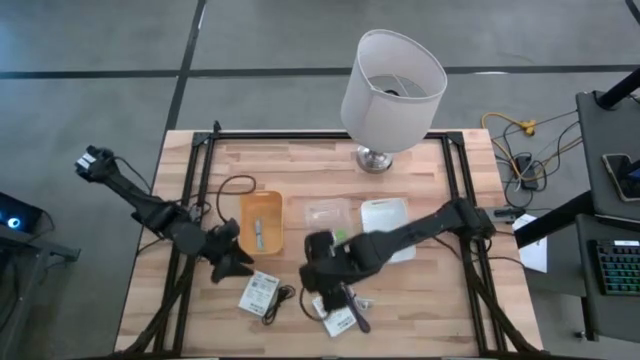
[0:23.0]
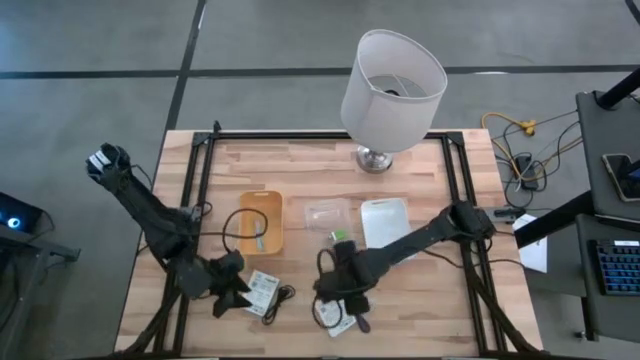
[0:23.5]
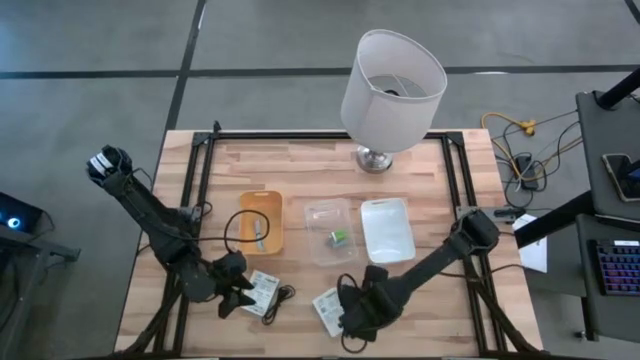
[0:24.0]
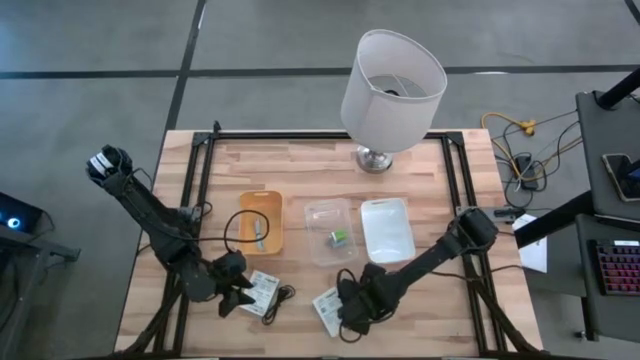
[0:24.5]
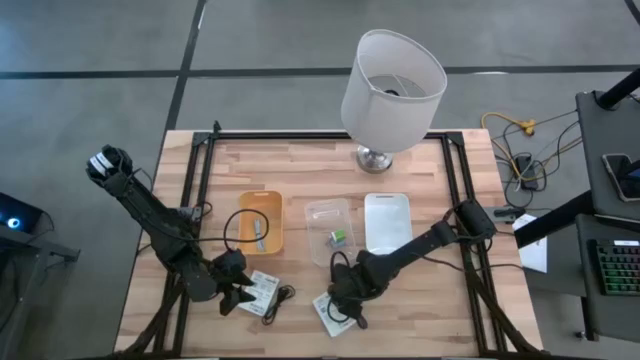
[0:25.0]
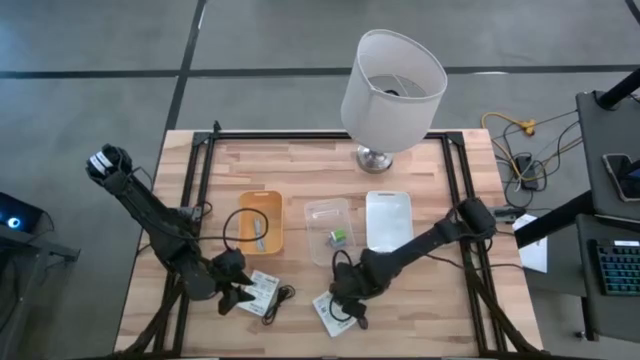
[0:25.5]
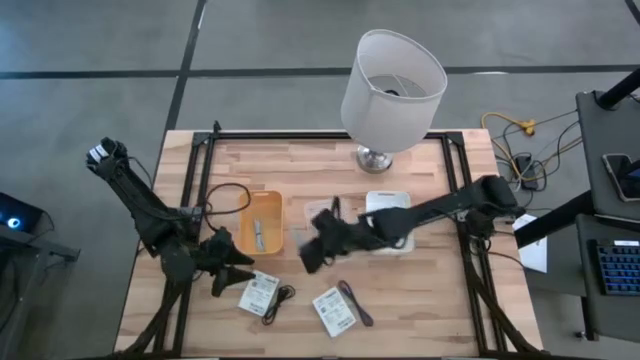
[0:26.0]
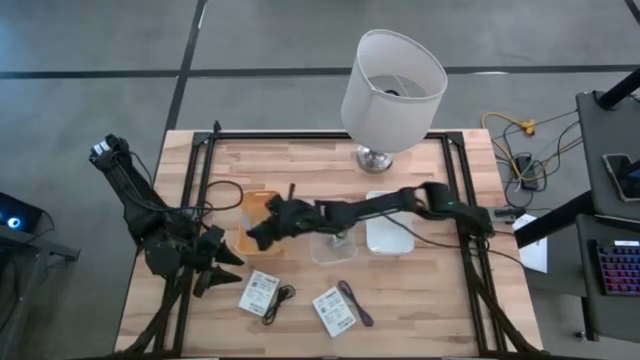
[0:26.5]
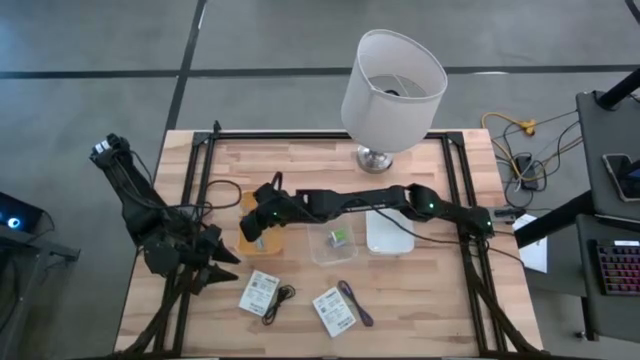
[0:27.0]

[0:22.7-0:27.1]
Task: Pick and place items into bin
Put the white charger cable into the orange bin

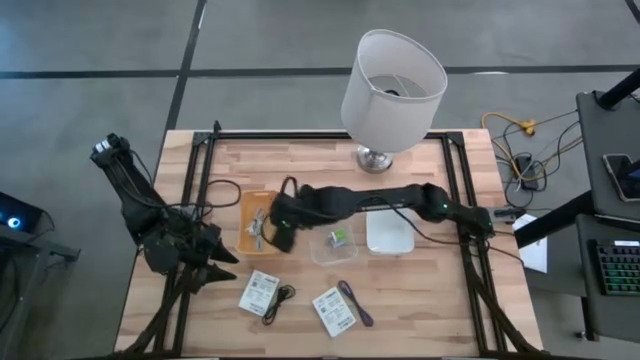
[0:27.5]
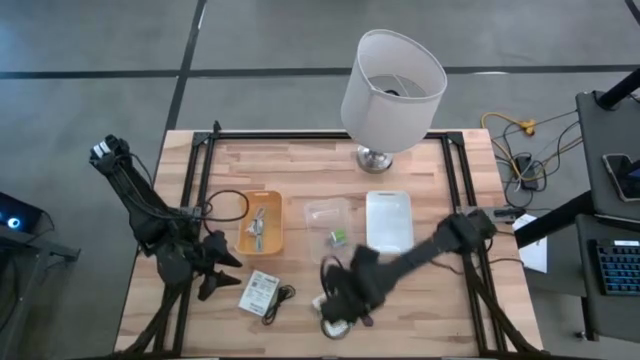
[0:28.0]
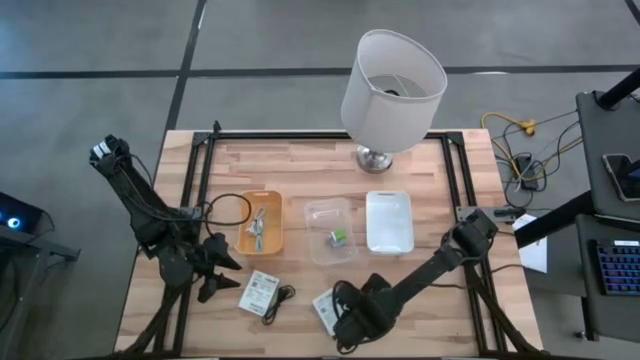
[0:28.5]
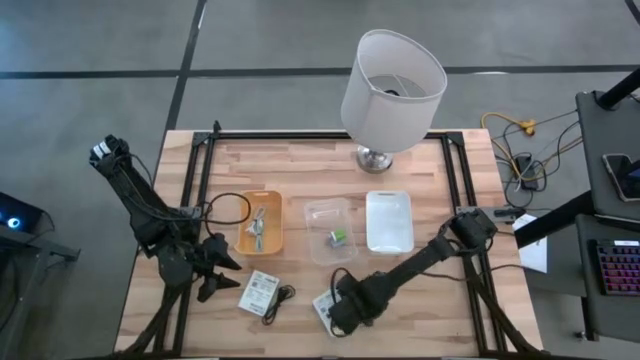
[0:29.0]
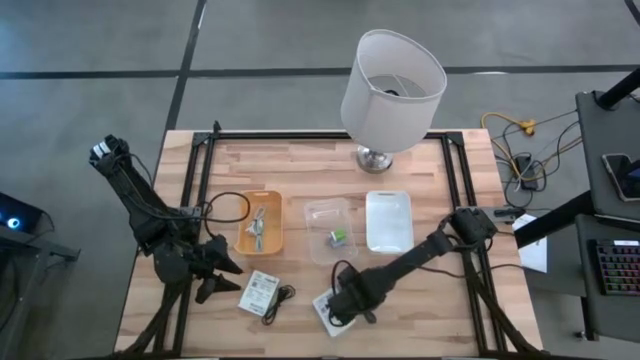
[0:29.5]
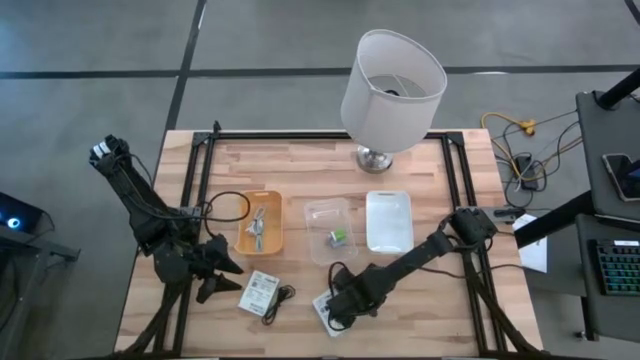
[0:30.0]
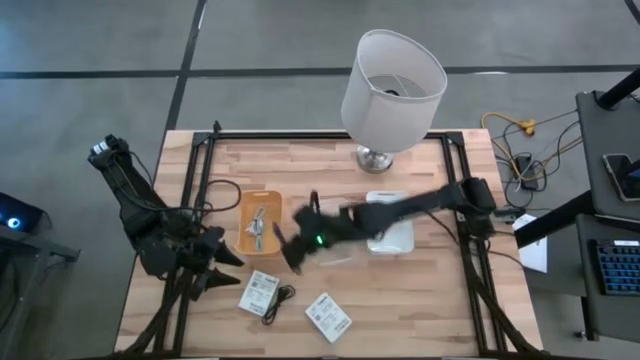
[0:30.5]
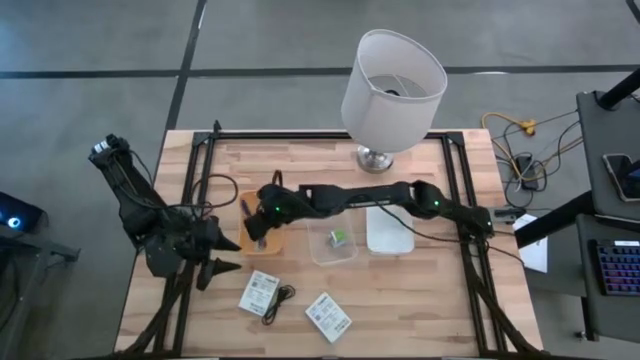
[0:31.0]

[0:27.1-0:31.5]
Put the black violet charger cable into the orange bin

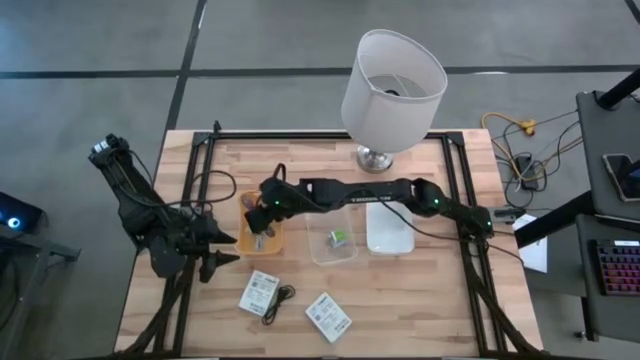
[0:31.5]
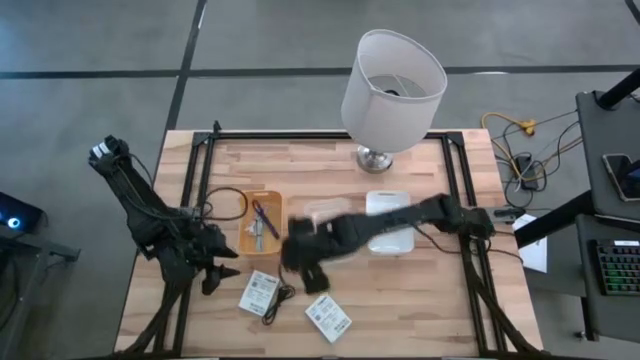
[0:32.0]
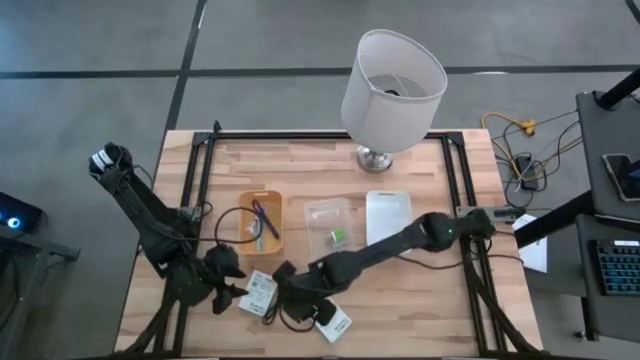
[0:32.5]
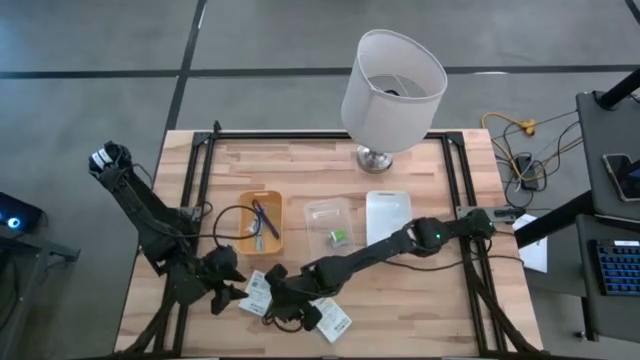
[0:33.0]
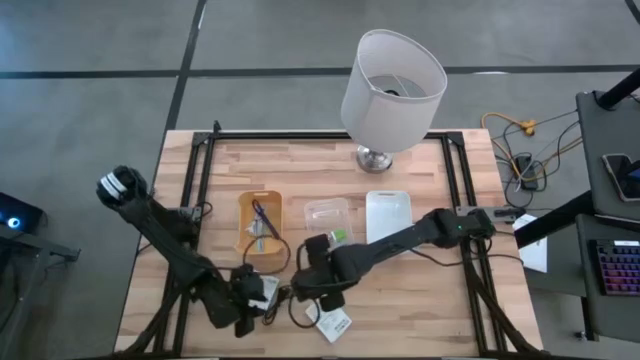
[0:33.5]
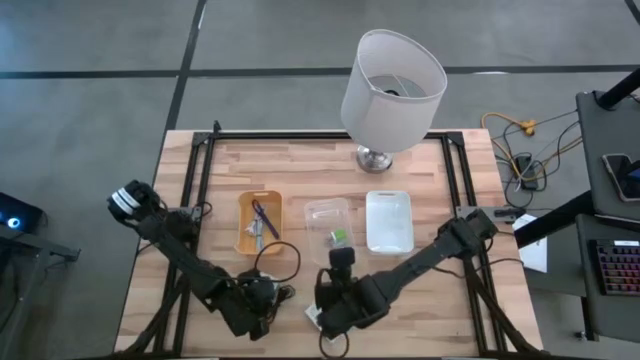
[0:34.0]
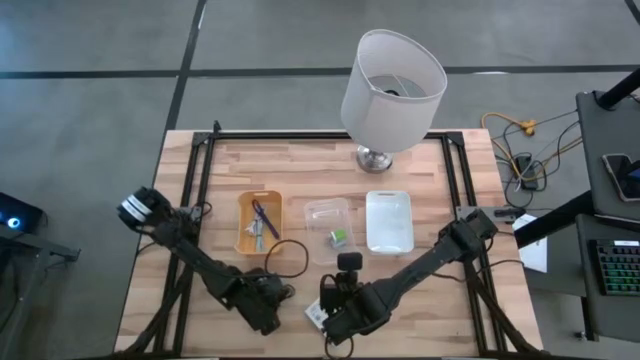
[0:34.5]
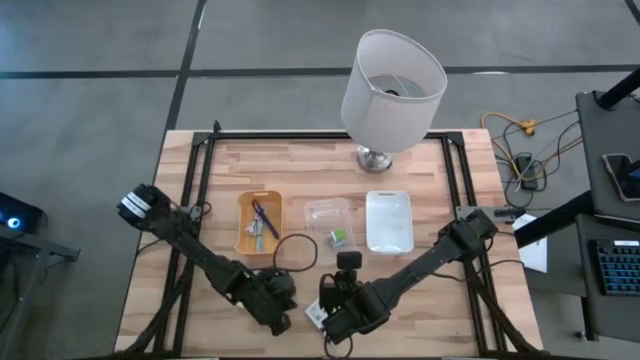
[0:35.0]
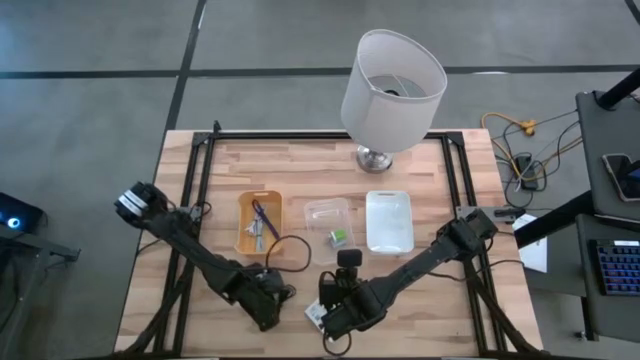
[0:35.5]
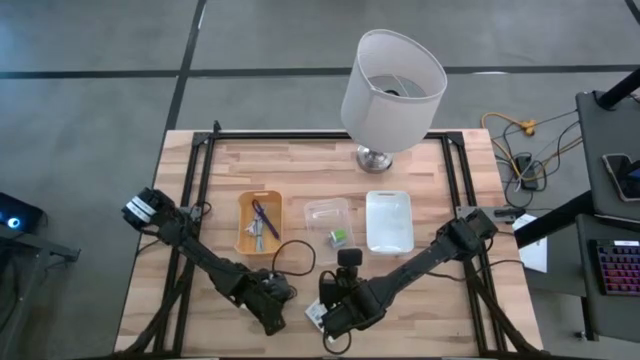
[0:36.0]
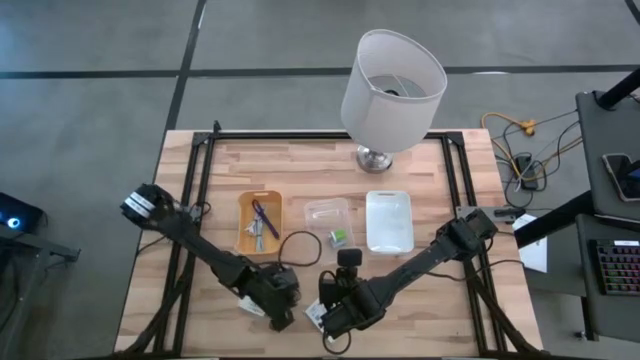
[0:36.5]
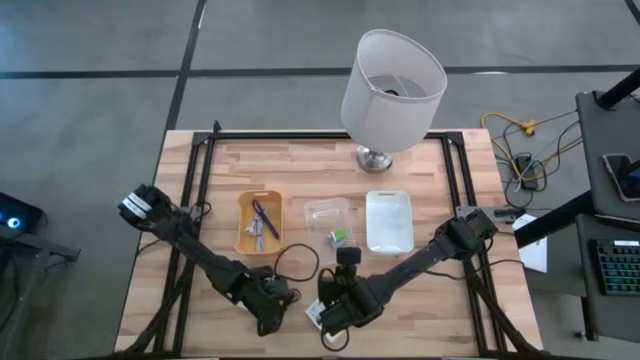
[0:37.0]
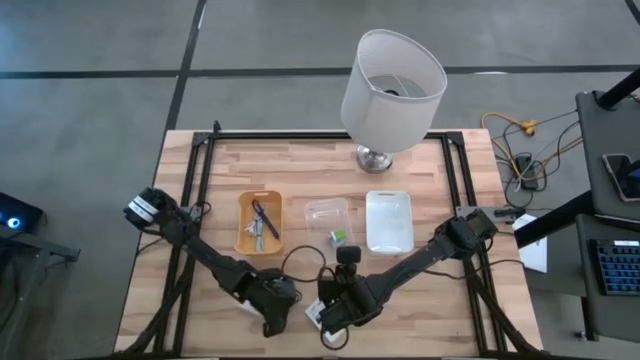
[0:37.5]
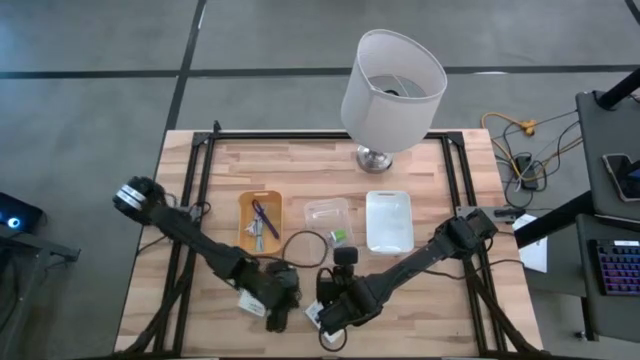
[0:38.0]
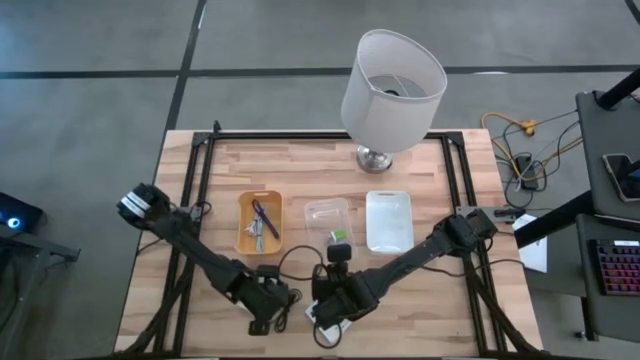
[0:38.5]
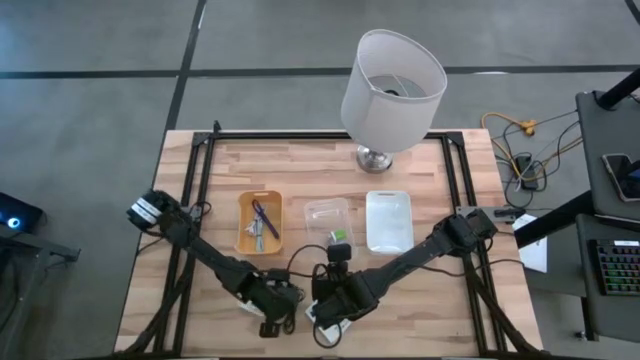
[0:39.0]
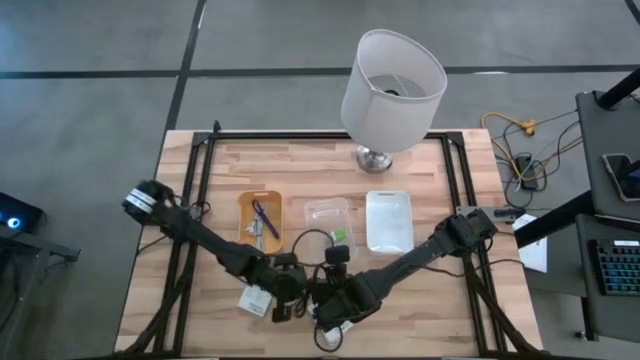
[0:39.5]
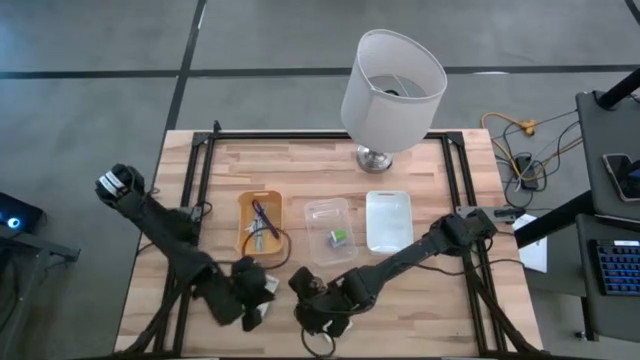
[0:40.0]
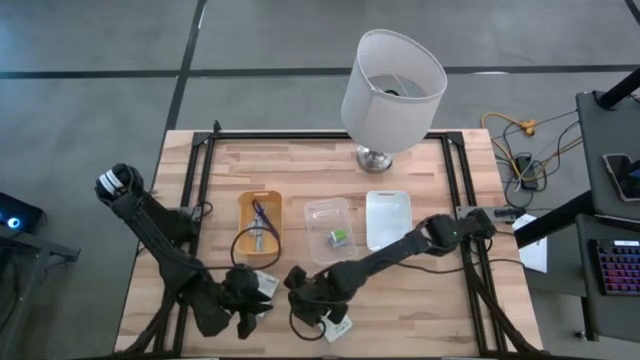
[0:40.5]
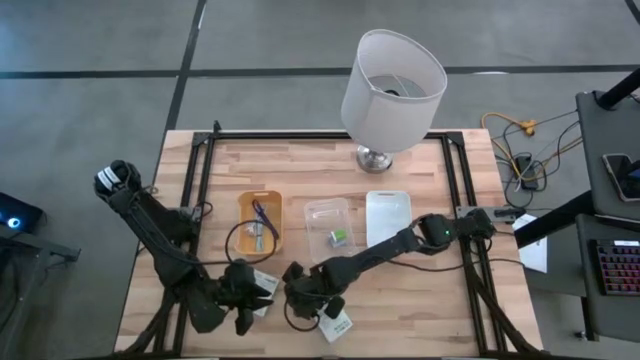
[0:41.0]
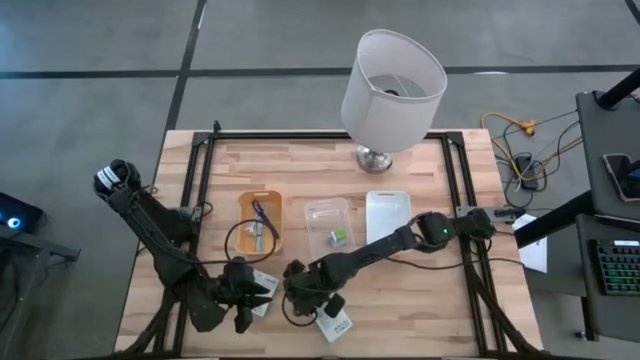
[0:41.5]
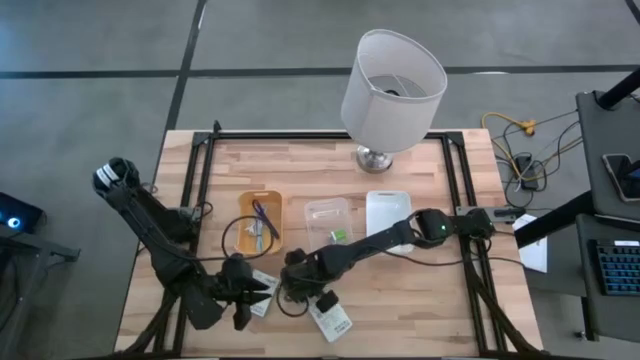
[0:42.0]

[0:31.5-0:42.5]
Put the black charger cable into the orange bin

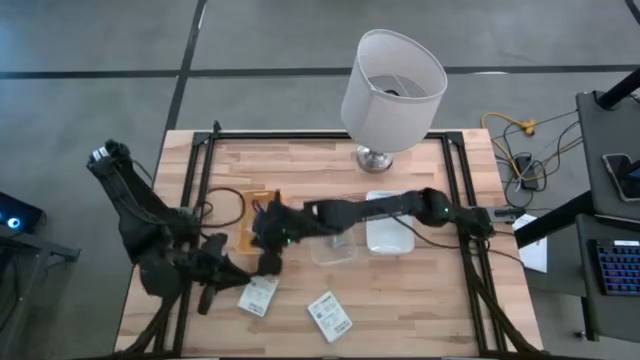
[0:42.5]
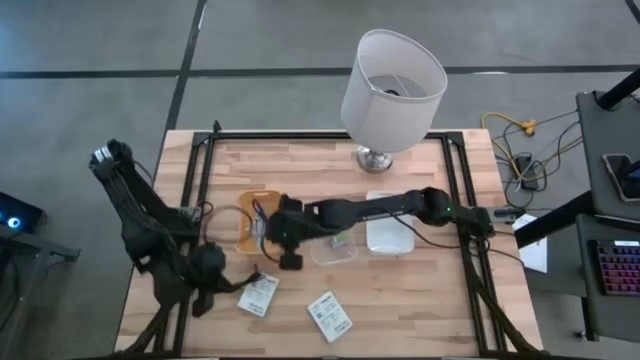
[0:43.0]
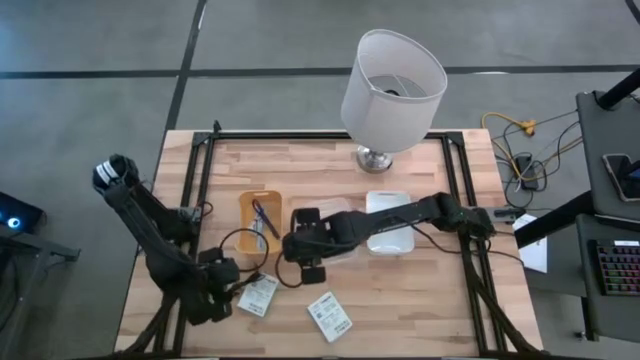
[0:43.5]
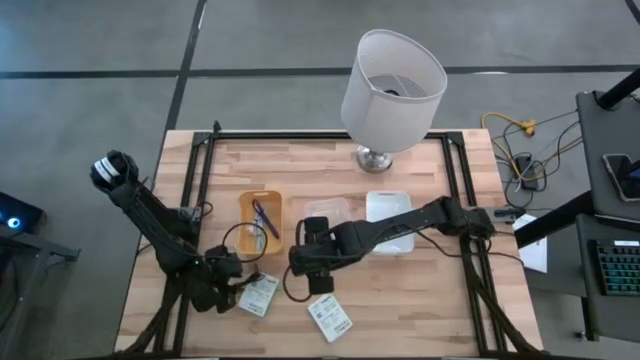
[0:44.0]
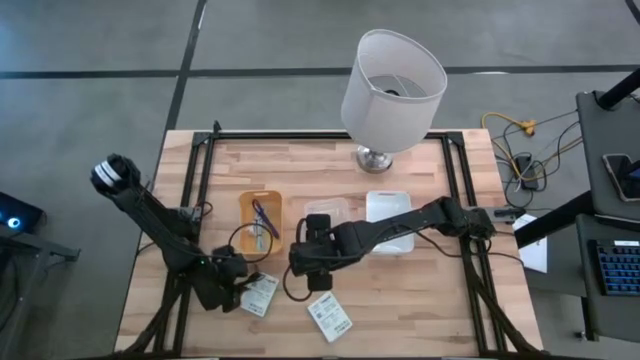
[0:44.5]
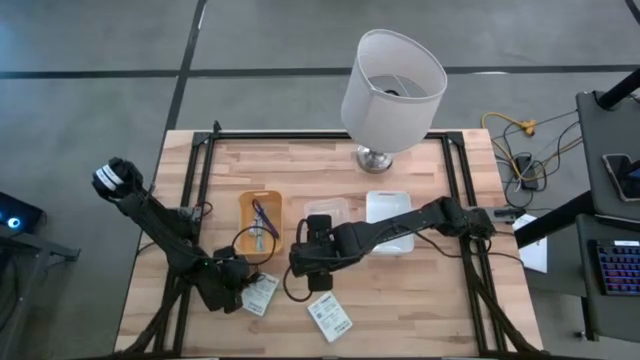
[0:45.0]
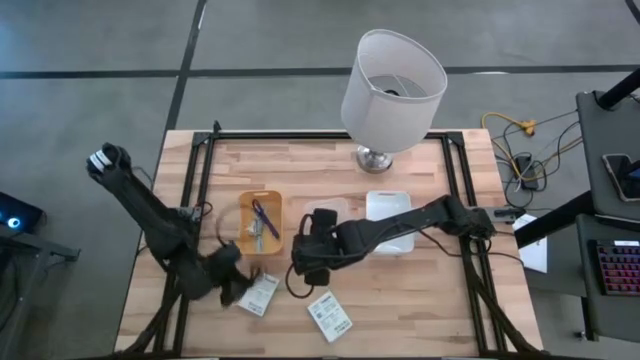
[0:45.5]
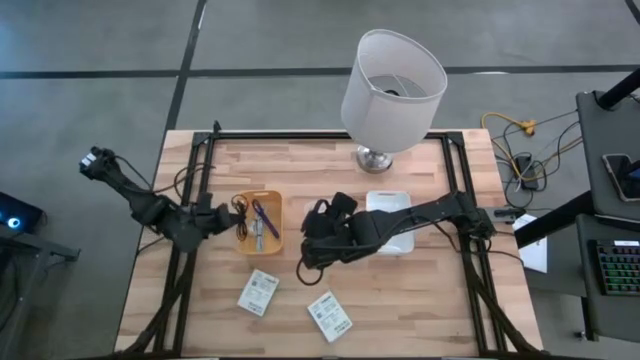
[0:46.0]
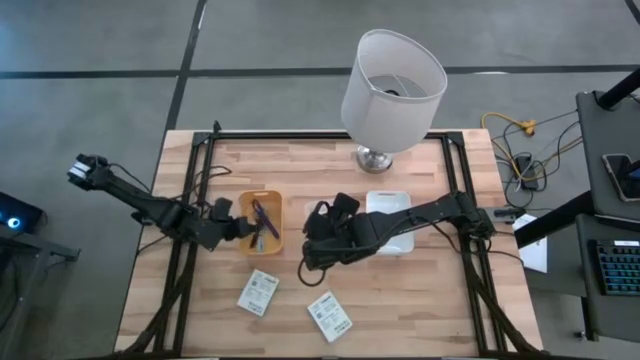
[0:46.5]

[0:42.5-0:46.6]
Put the black charger cable into the orange bin
